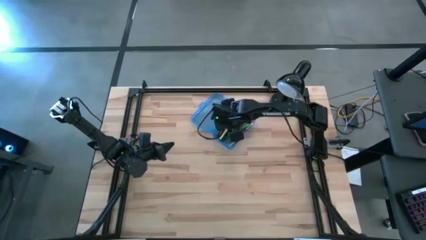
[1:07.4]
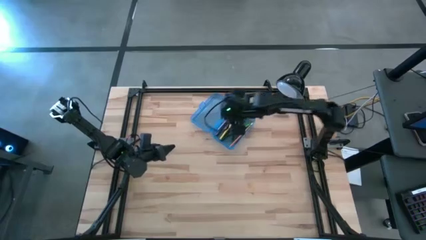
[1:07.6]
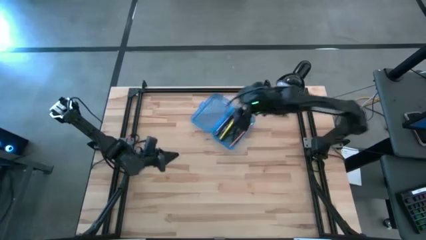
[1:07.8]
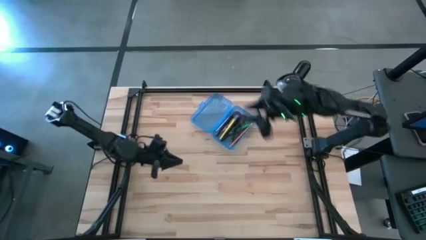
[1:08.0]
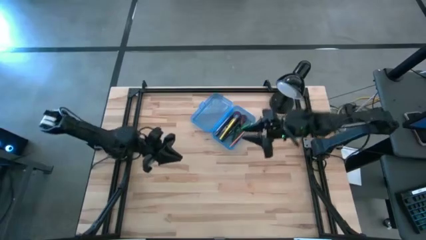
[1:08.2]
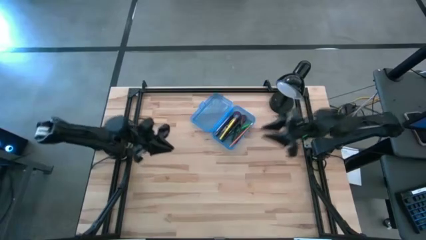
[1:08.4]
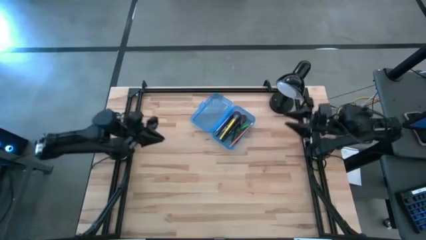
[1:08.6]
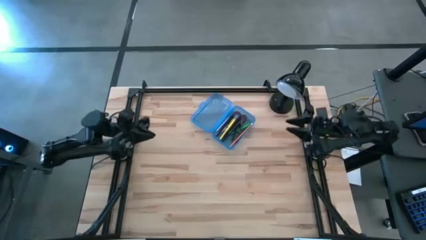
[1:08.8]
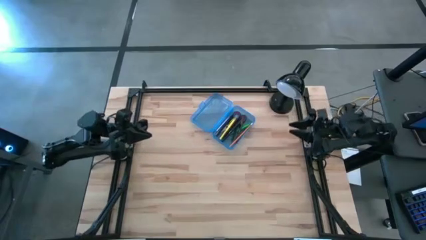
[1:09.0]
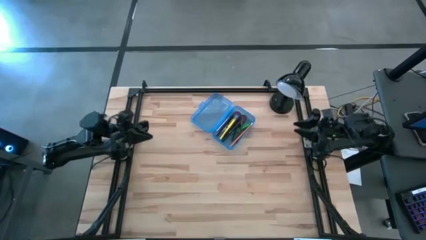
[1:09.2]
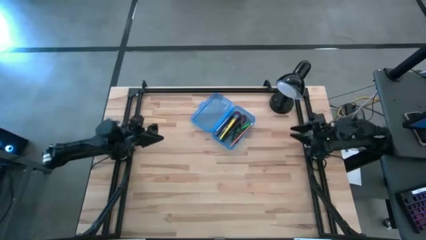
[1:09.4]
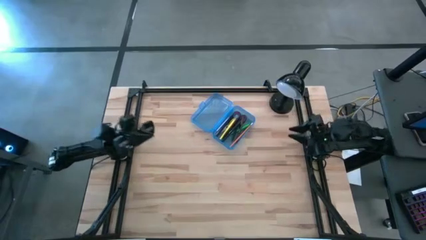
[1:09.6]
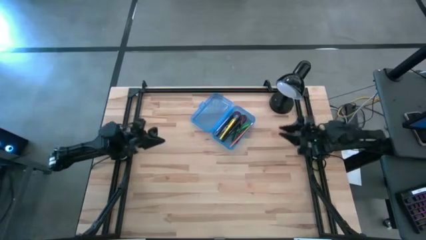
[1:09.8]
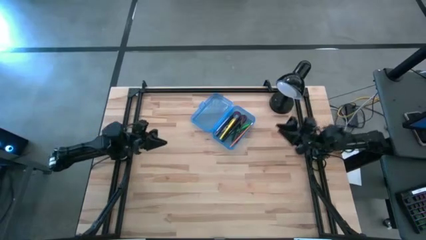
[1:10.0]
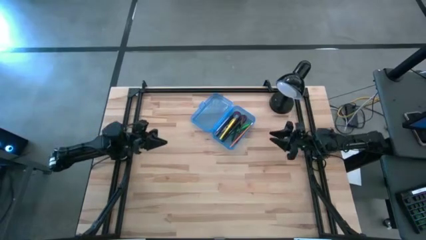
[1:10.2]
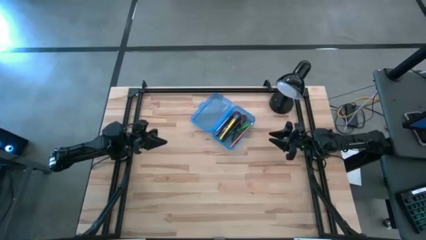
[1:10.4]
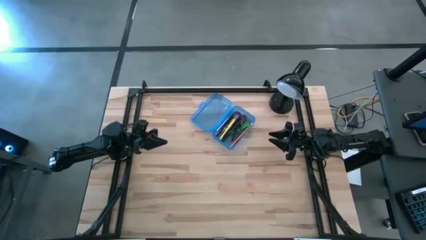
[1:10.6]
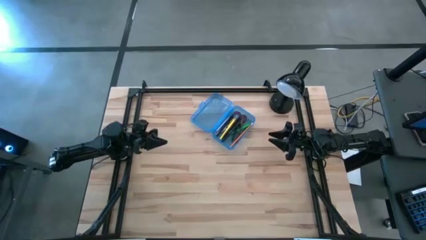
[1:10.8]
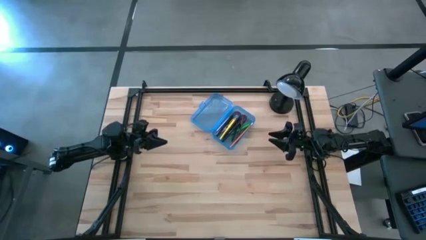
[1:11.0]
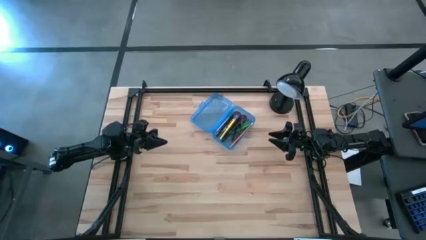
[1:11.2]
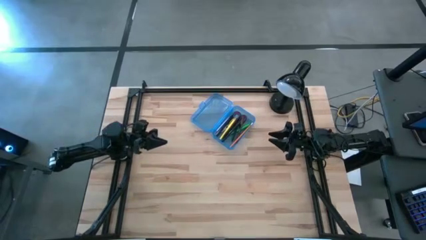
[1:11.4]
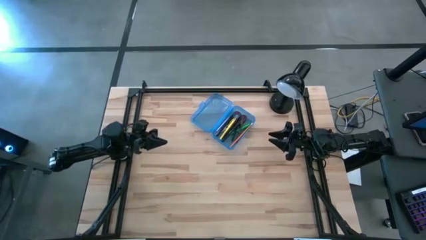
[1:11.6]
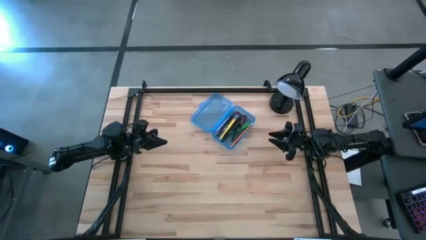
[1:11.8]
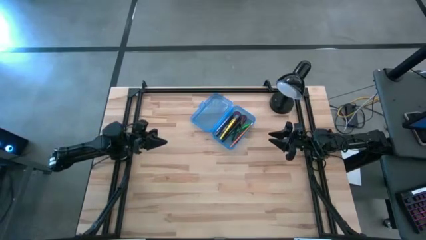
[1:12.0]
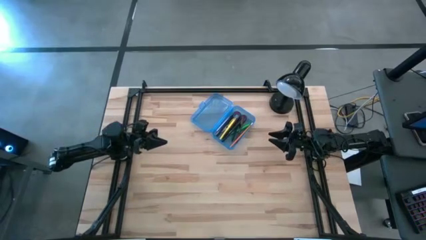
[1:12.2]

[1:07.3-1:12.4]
Task: Pick & place school supplies into a supply box
Return to Home Position

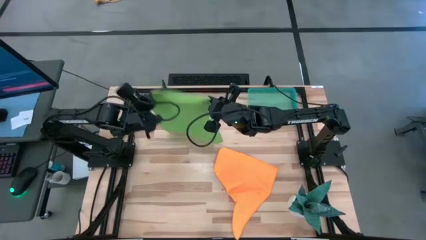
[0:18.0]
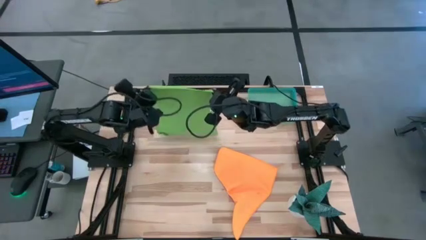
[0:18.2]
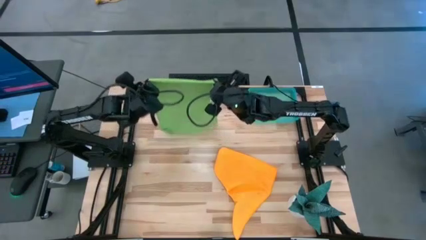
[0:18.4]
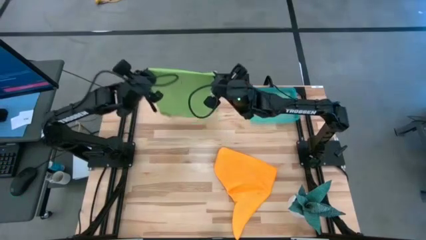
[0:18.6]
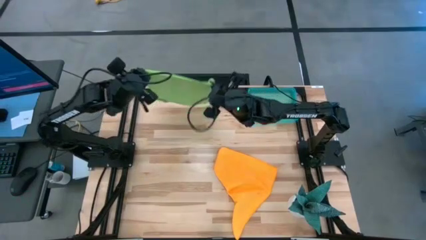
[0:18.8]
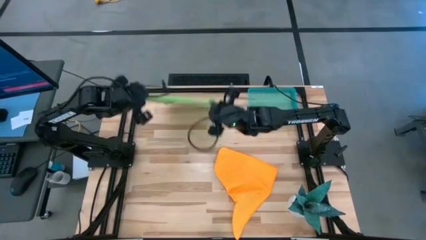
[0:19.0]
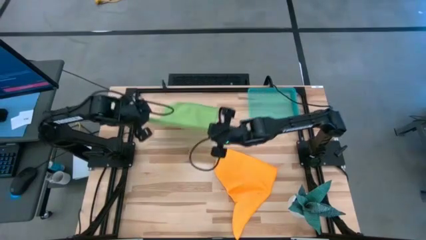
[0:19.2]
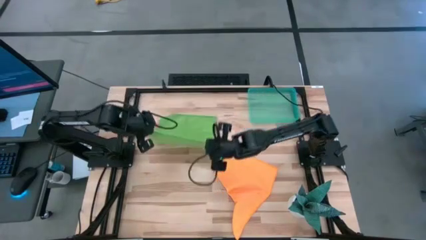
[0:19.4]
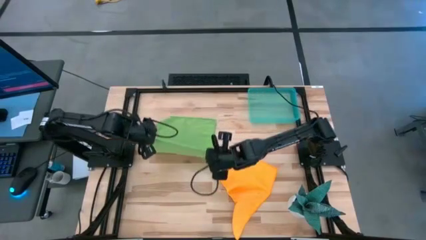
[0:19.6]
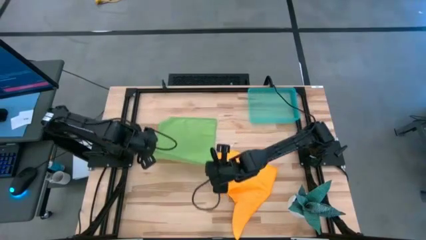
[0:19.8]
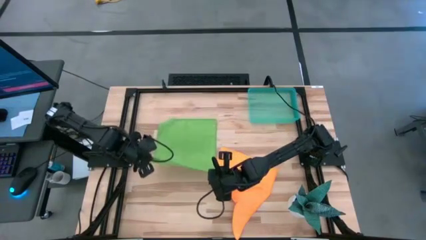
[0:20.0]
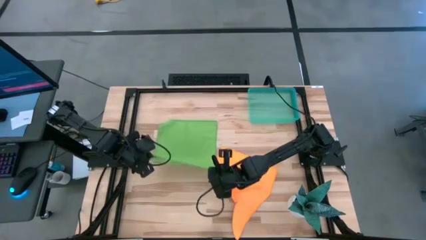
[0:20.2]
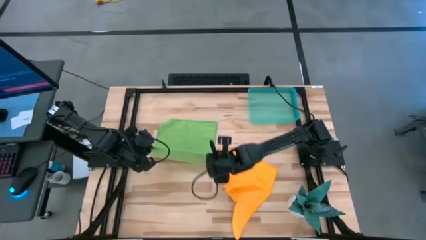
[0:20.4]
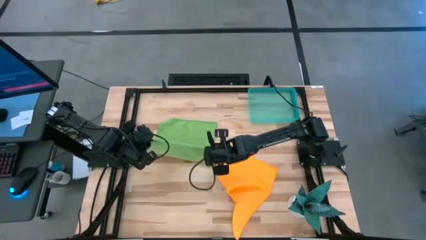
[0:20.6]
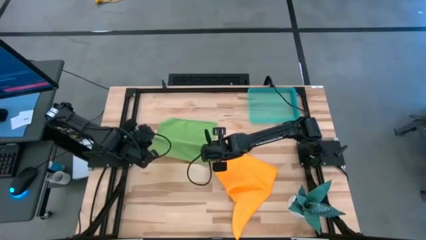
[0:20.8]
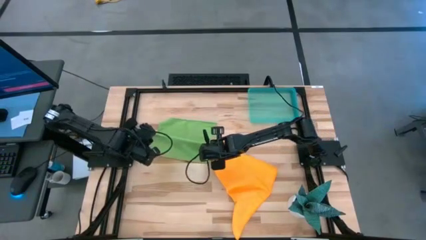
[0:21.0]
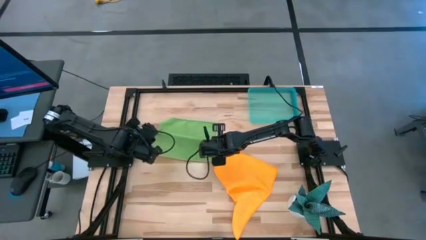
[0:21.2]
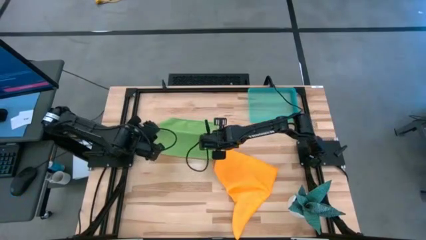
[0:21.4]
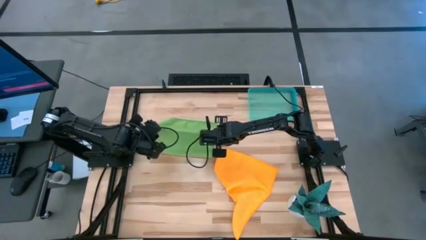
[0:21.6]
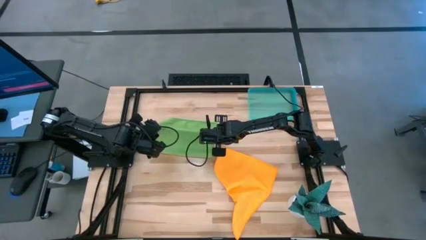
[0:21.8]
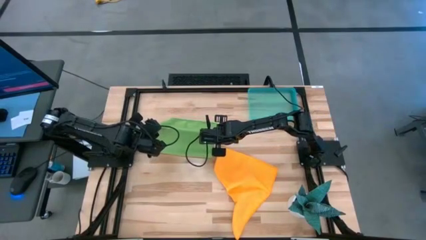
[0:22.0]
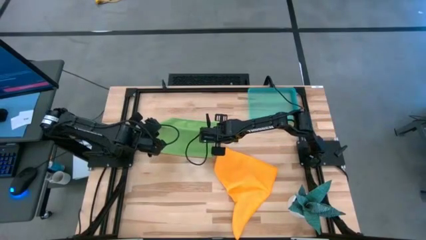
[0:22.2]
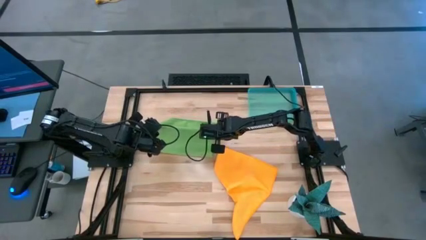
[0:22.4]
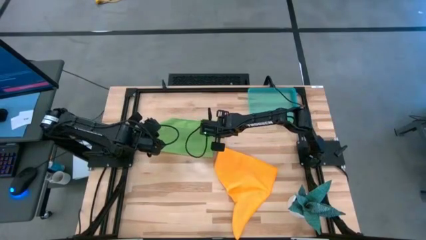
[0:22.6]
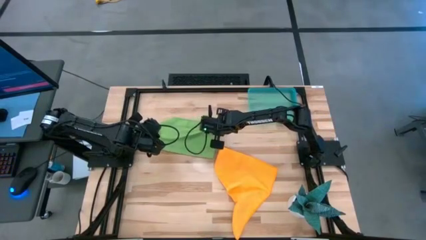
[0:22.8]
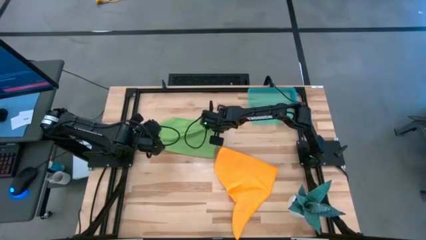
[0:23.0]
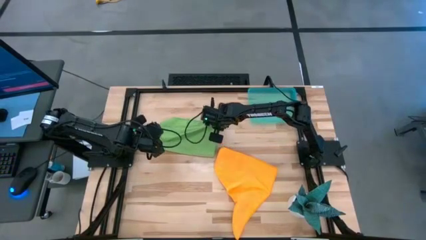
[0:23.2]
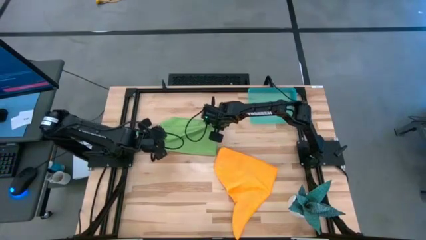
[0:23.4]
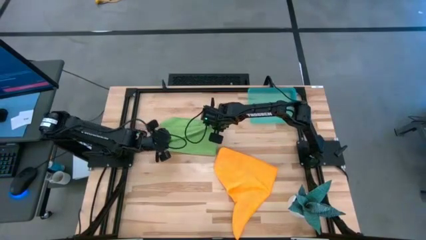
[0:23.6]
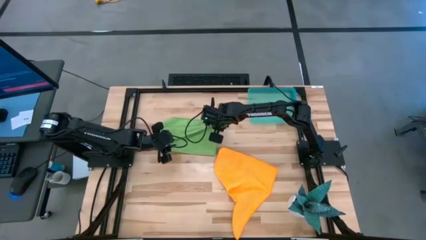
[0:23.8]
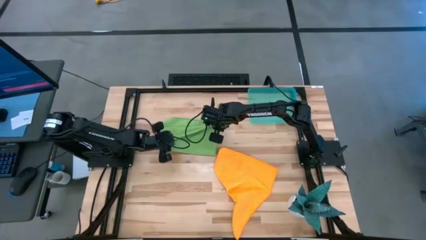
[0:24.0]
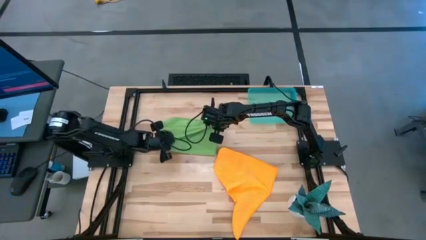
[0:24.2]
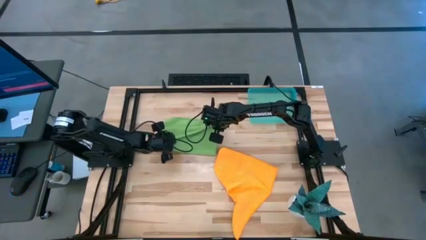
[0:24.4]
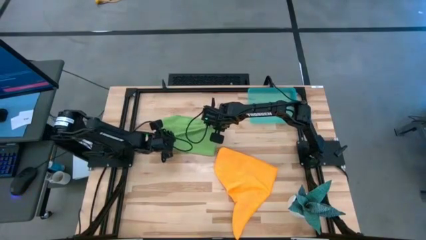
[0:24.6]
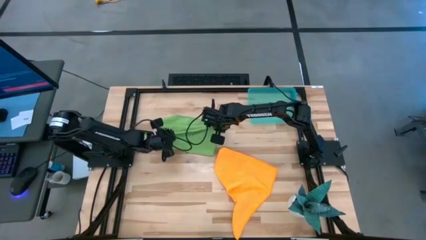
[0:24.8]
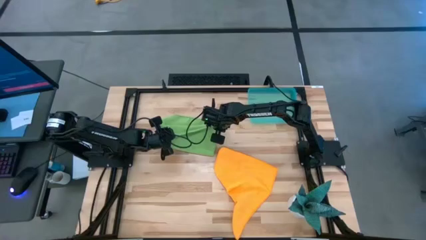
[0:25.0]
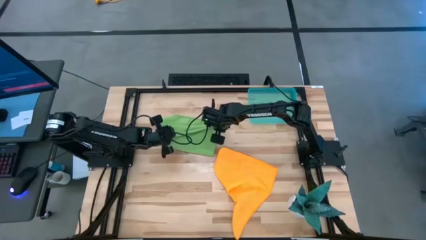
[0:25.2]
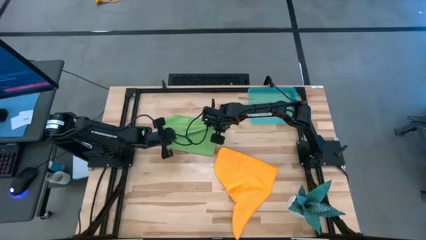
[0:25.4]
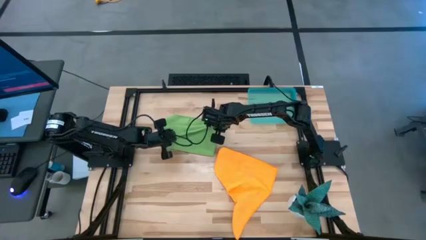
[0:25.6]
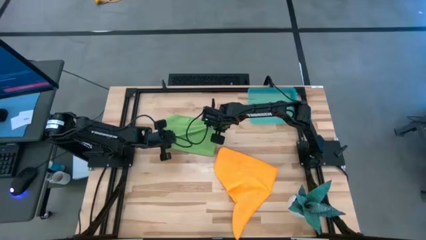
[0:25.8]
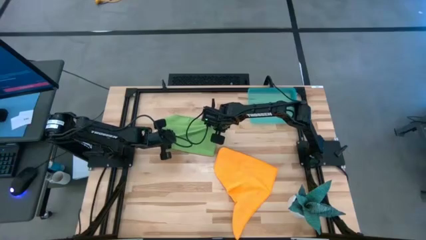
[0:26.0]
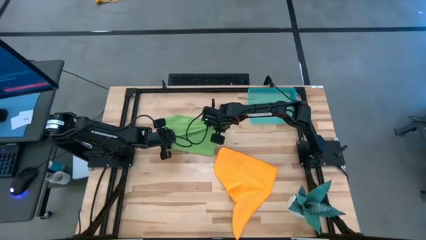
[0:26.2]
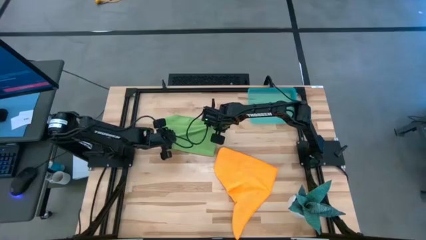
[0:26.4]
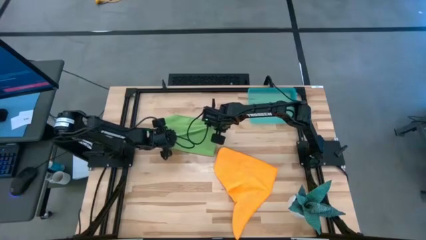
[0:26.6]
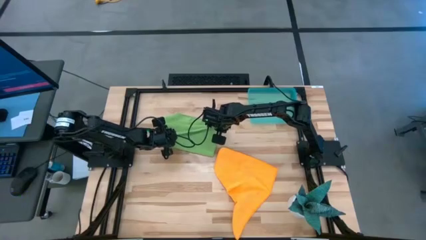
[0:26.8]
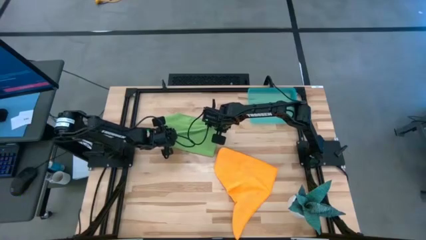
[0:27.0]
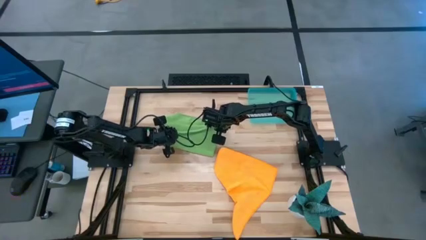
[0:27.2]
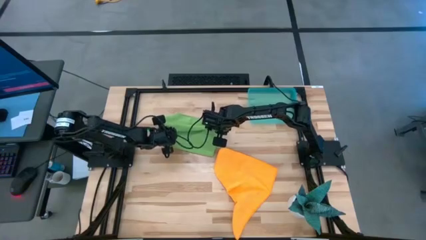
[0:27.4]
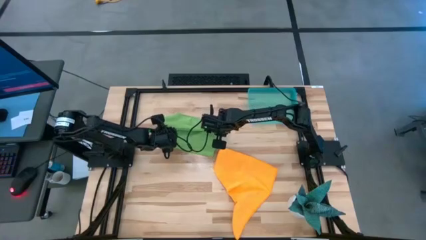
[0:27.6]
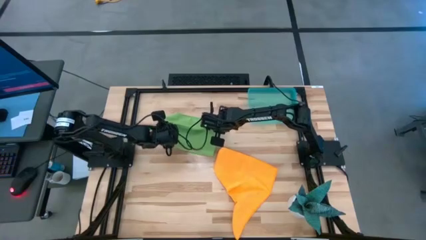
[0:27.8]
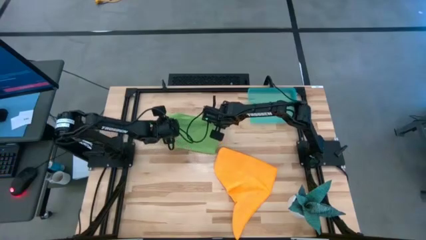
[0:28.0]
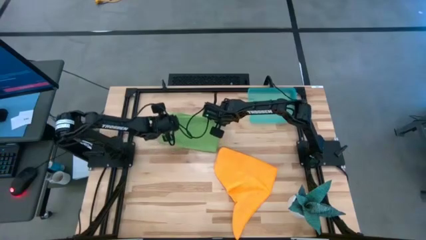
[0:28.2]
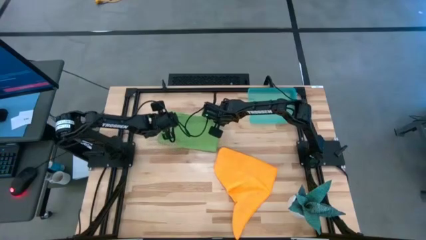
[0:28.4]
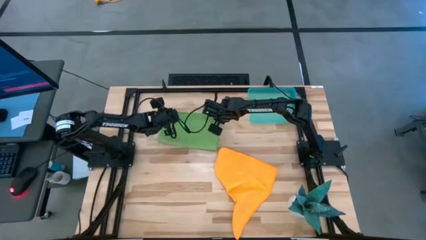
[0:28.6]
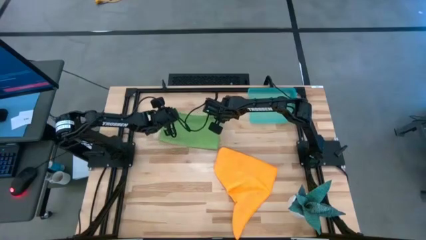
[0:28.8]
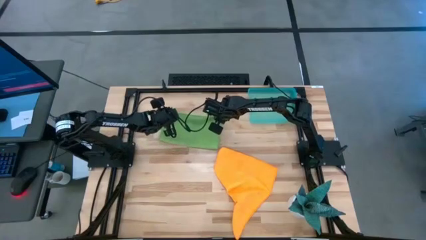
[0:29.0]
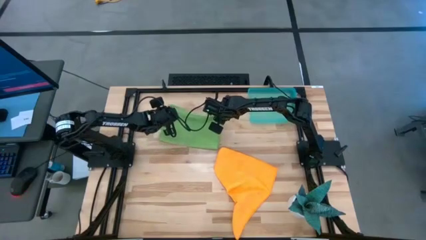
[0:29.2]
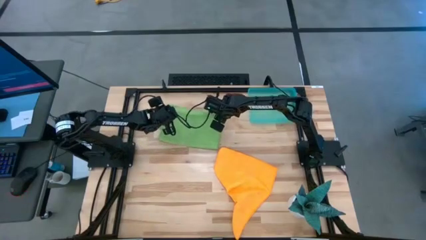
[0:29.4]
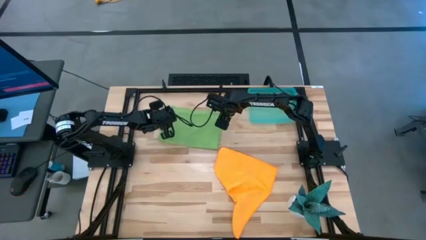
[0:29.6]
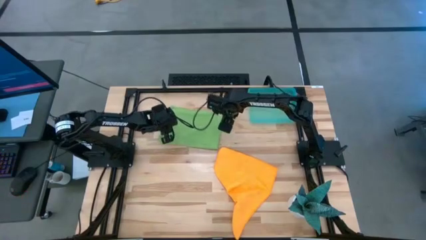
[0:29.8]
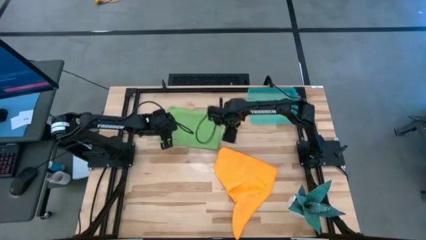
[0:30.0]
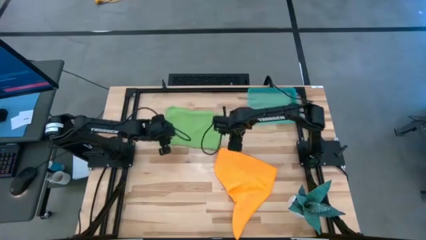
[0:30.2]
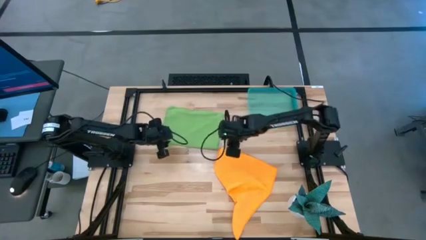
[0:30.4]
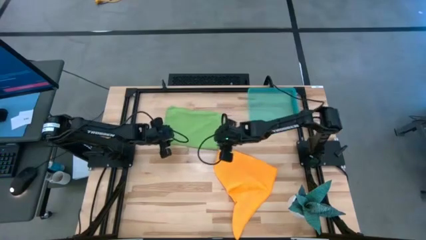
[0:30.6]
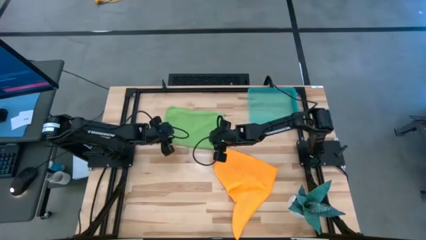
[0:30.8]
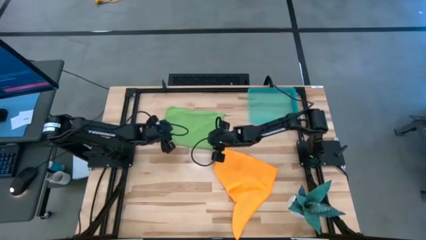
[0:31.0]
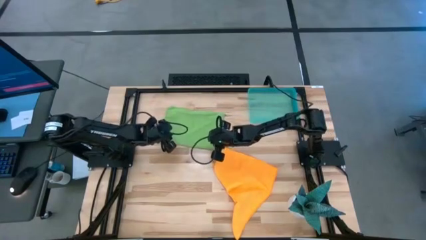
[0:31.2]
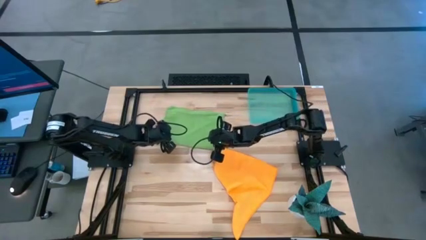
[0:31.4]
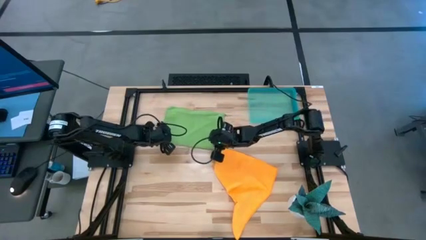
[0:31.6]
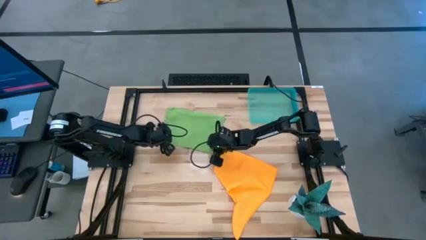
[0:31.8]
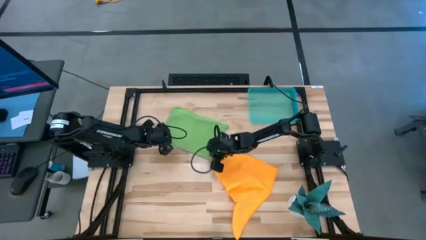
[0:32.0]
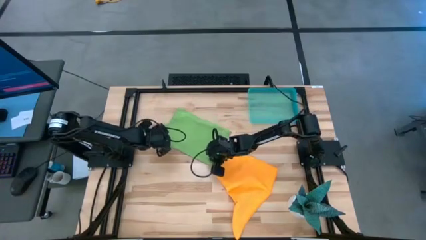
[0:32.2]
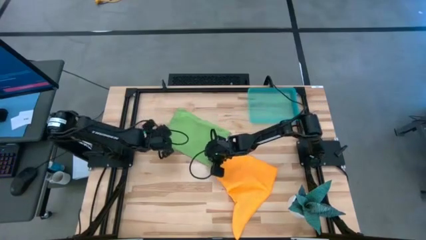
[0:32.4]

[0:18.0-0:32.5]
Task: Roll microfiber towels into tight, uniform cylinder then place into a basket
Fold the green microfiber towel
